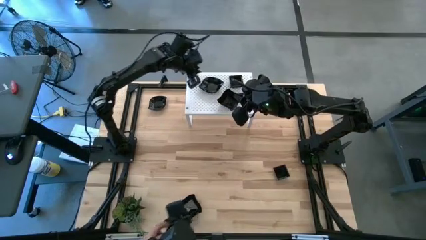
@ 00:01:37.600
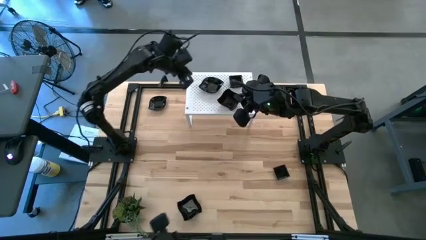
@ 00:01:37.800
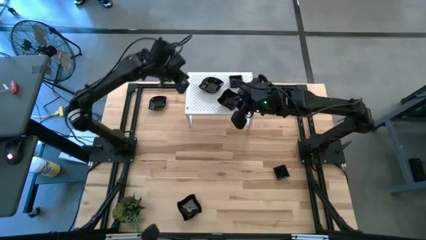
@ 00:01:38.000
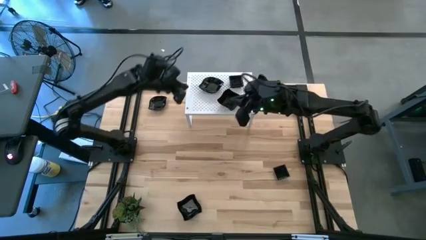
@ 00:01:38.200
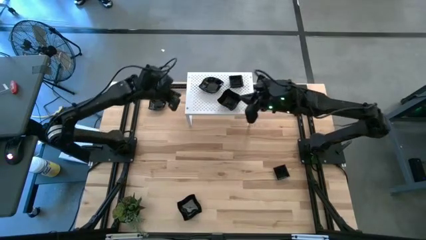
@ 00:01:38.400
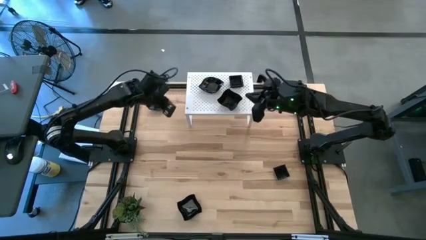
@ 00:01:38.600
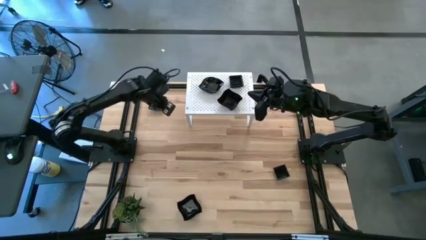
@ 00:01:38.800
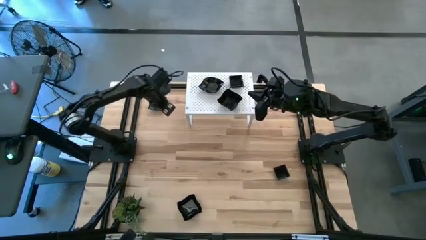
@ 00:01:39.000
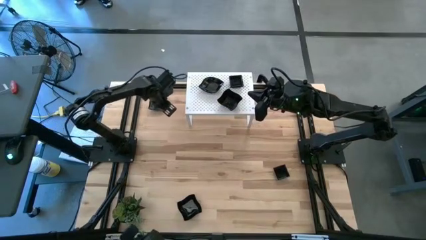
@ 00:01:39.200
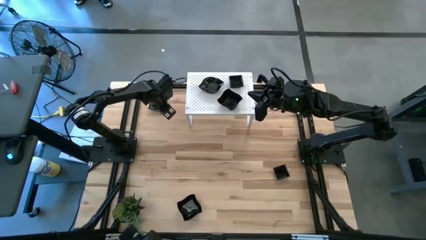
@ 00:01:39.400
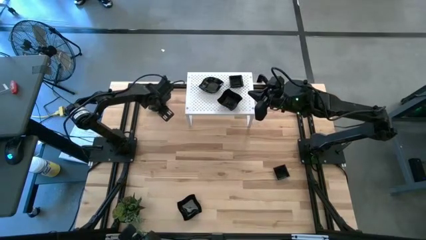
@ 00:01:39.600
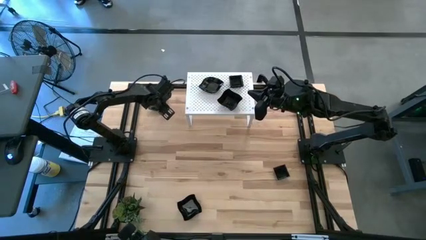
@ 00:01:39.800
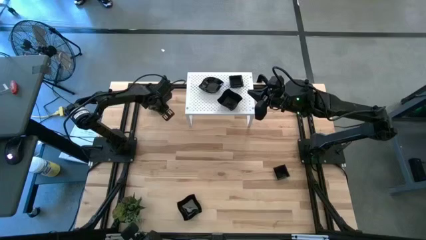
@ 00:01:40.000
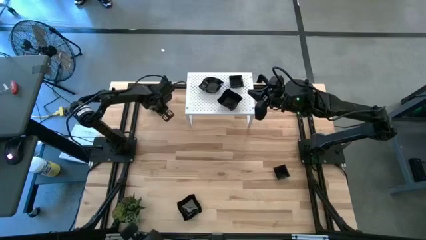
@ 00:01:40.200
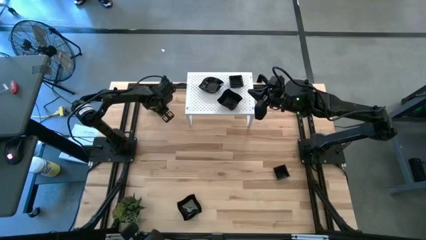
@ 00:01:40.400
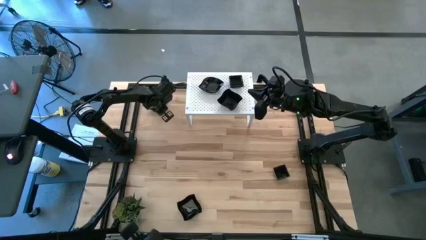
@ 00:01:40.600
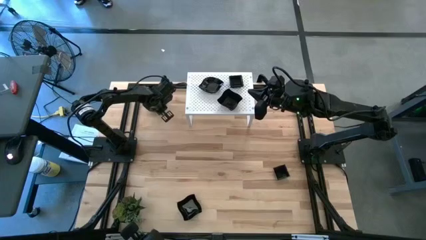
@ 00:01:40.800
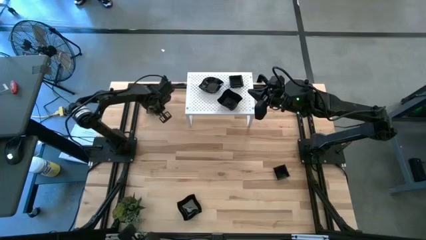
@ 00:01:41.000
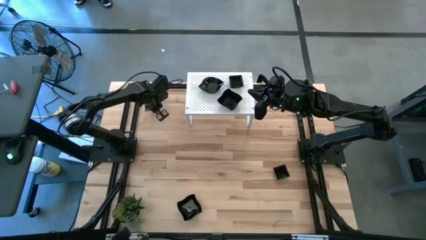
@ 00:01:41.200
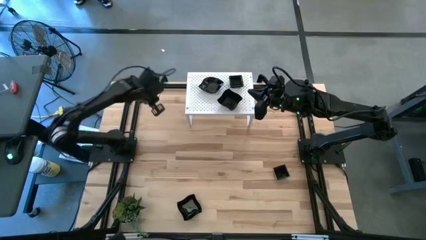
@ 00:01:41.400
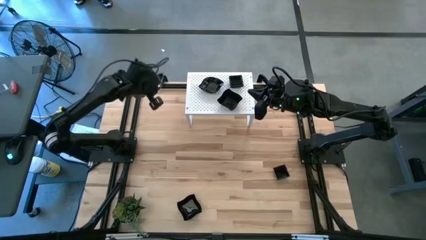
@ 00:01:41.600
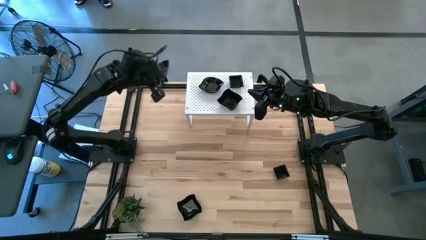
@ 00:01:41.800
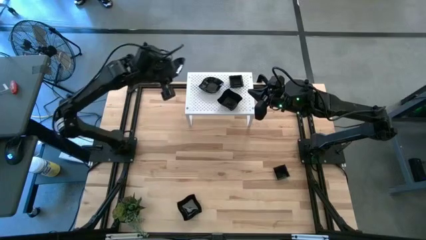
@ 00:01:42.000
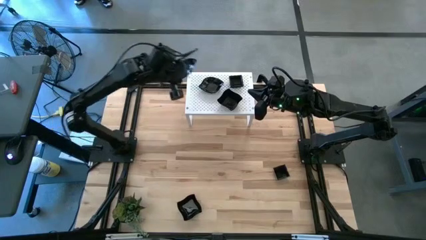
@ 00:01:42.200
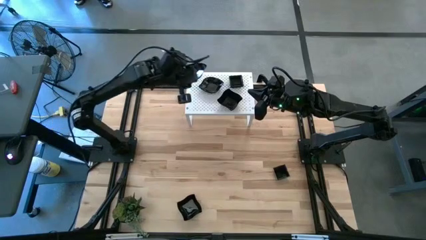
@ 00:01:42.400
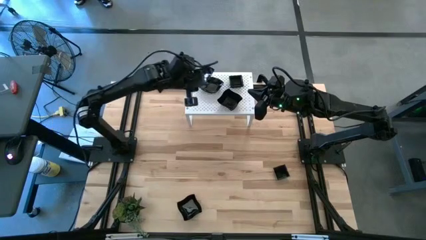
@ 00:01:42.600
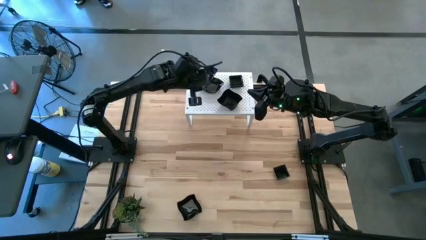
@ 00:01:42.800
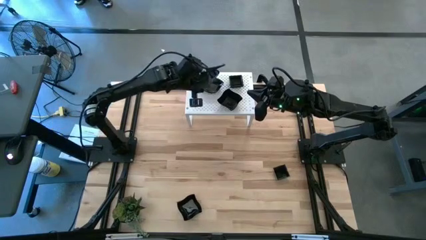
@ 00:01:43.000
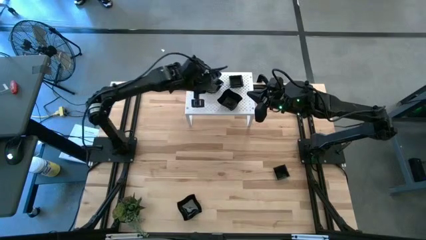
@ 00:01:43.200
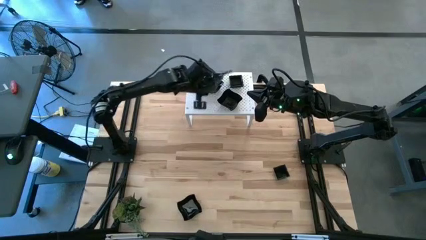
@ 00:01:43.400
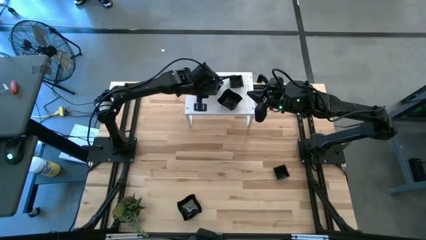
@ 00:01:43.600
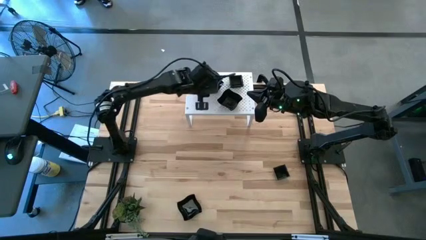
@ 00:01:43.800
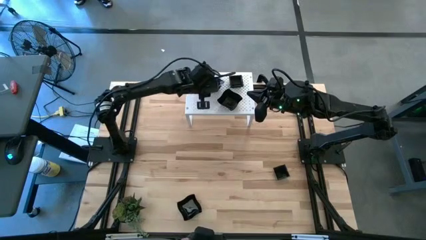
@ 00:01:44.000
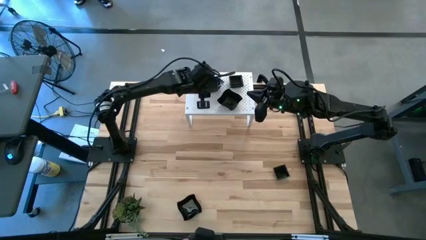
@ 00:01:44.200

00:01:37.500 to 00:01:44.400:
Task: Pick & Place Mini shaped plates
Stack the leaf-shaped plate on top of the stacked leaf-shaped plate on the shelf

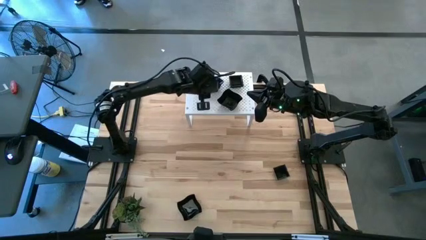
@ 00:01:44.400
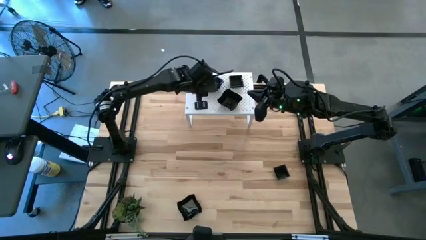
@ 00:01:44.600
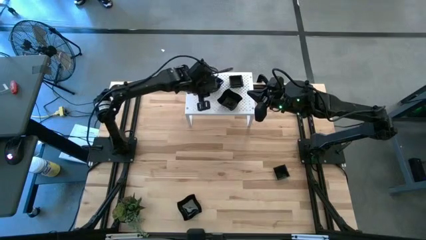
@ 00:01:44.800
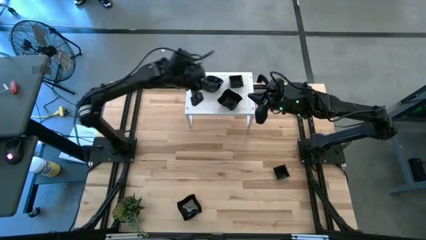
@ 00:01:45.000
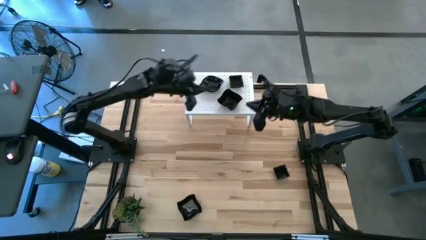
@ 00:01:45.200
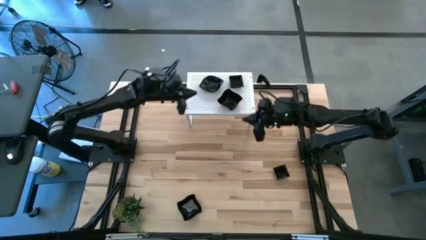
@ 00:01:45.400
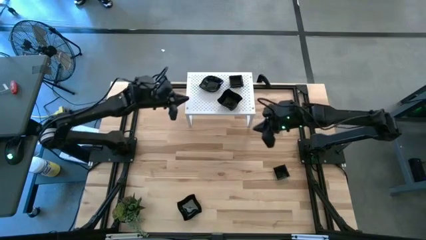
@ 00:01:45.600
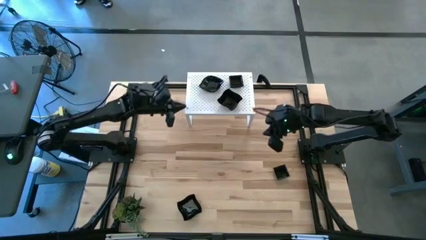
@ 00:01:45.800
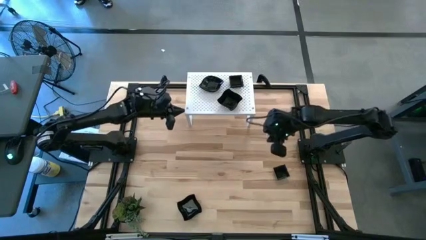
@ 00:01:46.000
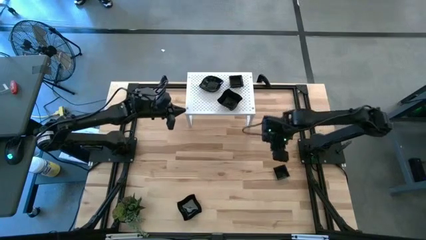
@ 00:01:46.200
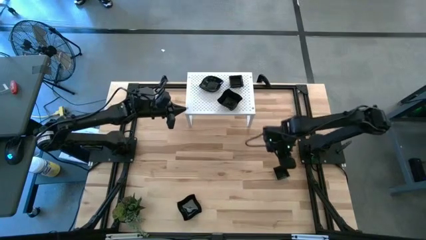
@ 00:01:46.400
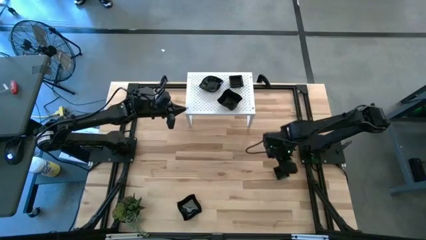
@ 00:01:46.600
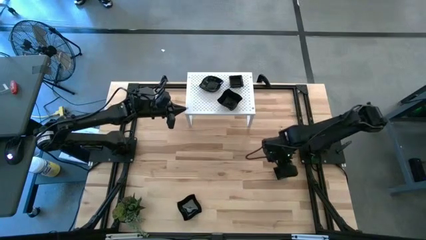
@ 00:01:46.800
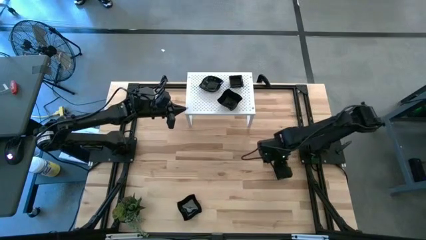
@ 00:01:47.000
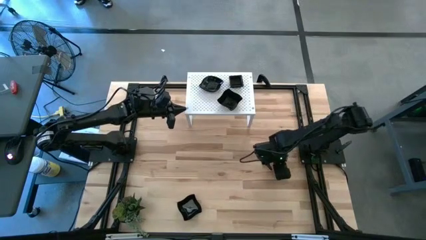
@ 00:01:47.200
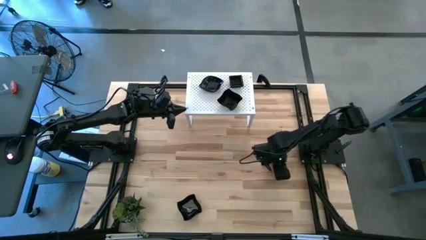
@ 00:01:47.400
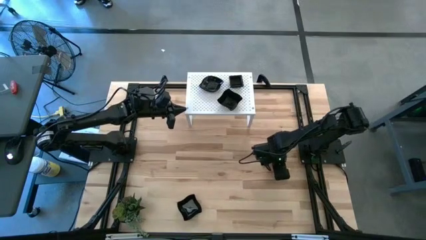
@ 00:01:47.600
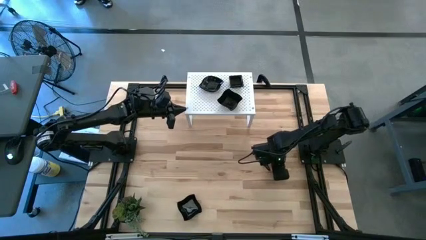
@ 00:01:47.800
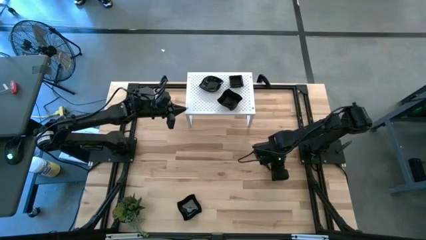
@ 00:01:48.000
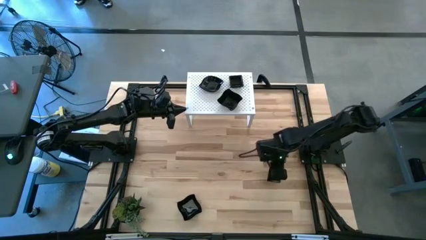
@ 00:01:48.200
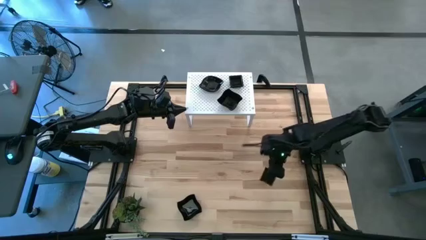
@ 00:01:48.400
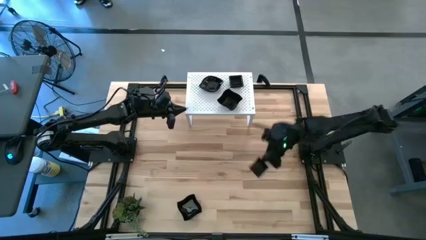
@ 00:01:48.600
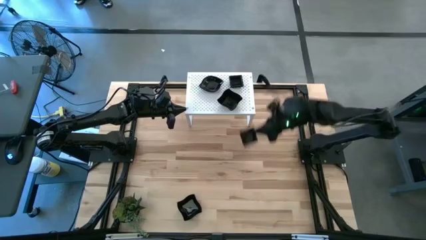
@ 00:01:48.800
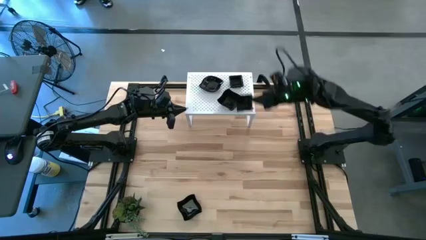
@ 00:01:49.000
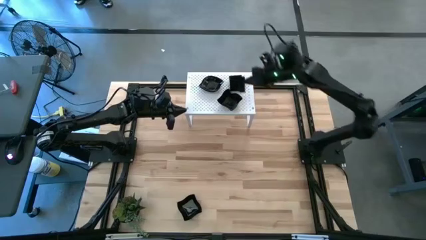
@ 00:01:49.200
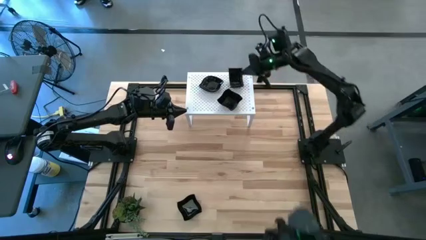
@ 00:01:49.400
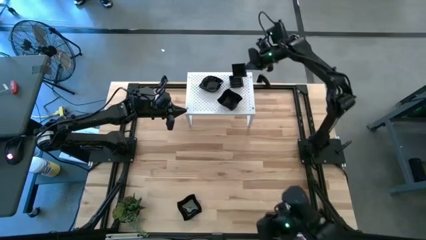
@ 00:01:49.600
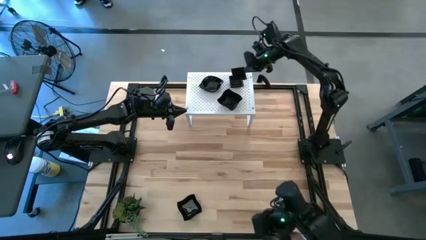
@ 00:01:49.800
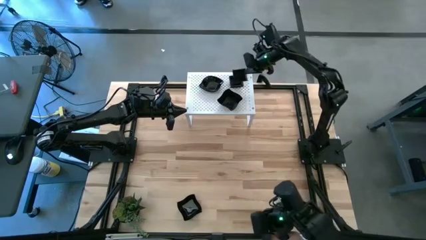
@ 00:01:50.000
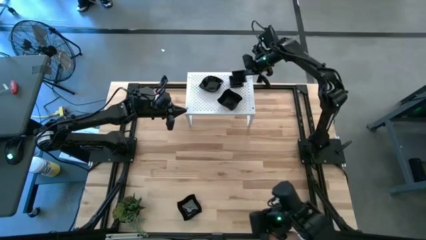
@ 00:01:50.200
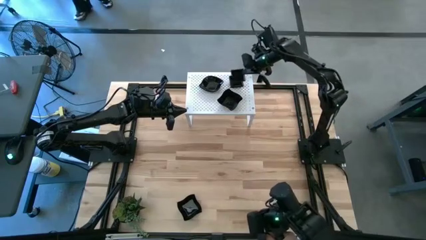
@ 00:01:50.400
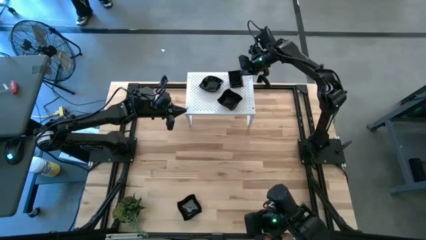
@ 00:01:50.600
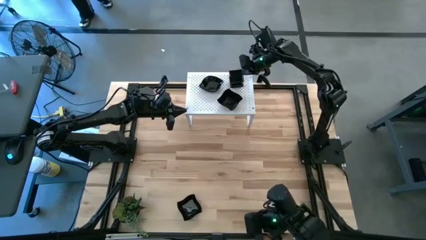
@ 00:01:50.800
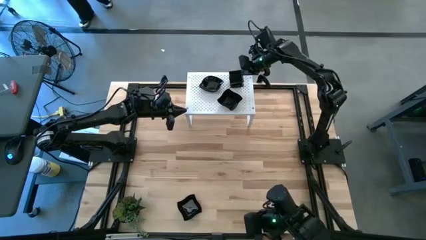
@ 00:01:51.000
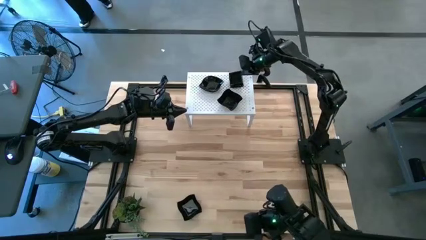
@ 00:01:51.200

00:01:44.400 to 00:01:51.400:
Stack the square plate on top of the stacked square plate on the shelf

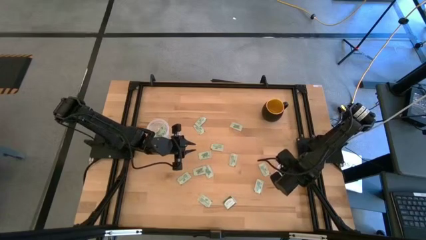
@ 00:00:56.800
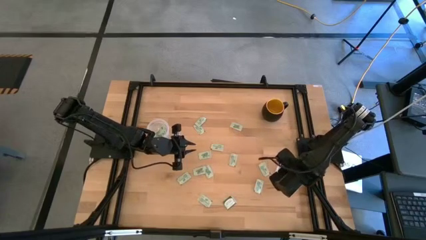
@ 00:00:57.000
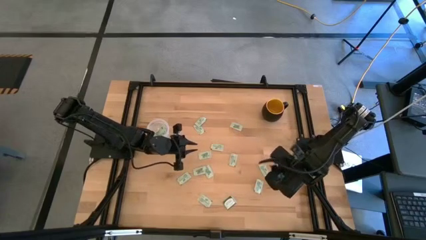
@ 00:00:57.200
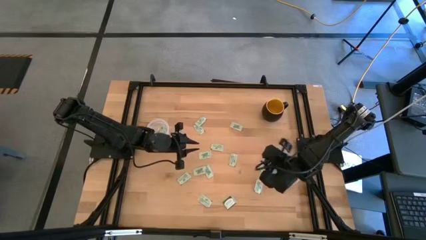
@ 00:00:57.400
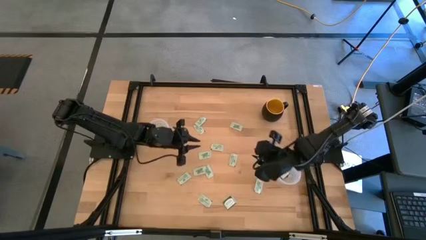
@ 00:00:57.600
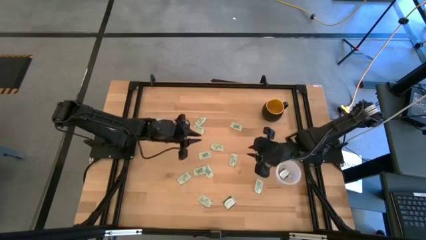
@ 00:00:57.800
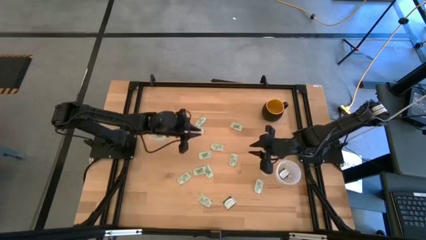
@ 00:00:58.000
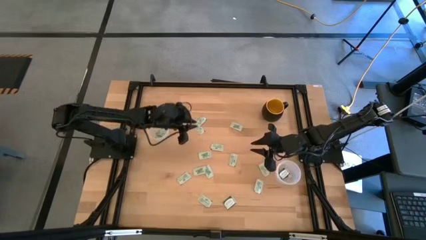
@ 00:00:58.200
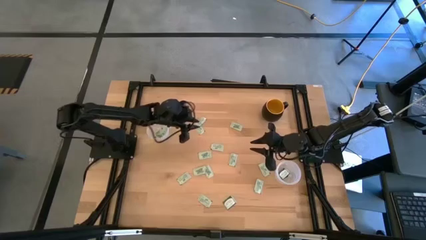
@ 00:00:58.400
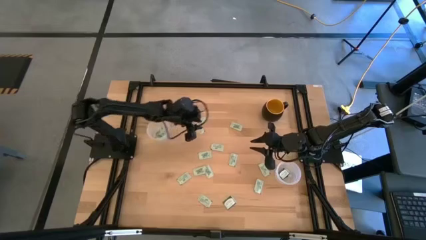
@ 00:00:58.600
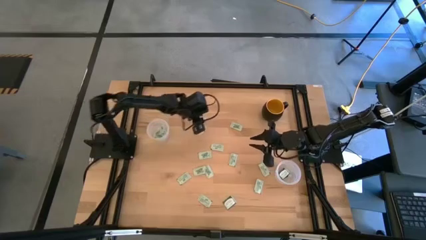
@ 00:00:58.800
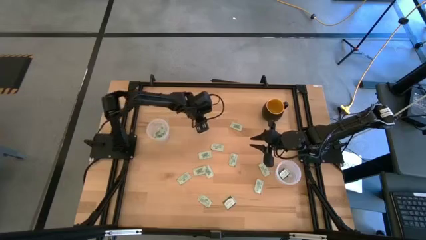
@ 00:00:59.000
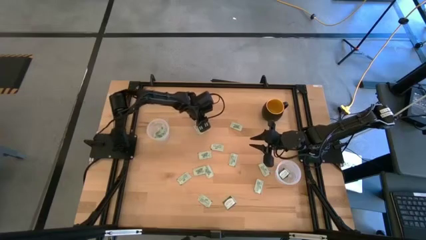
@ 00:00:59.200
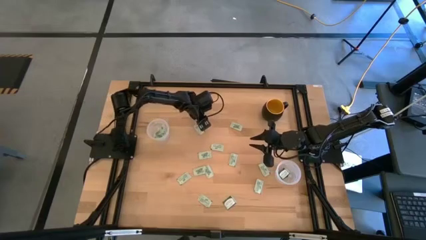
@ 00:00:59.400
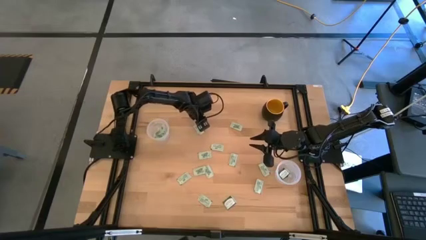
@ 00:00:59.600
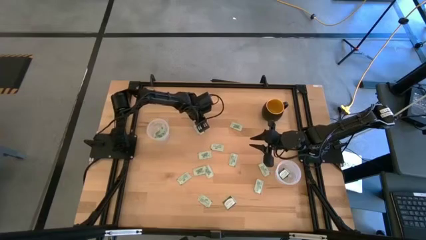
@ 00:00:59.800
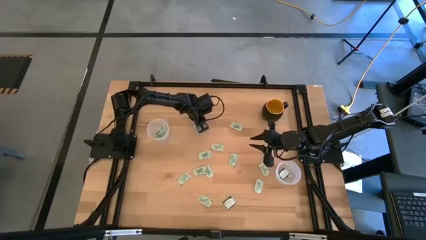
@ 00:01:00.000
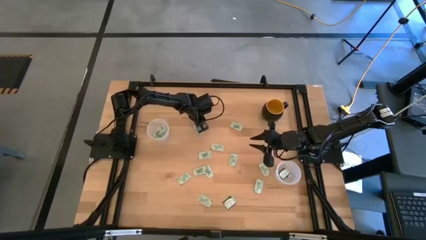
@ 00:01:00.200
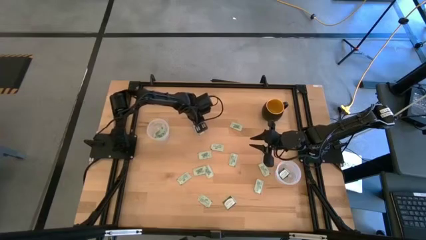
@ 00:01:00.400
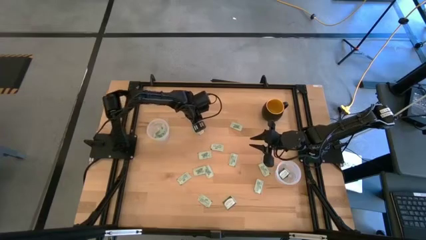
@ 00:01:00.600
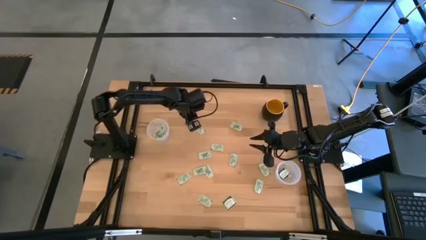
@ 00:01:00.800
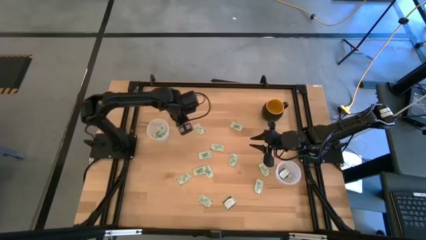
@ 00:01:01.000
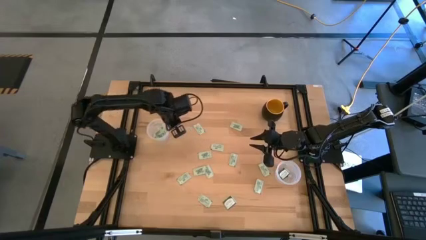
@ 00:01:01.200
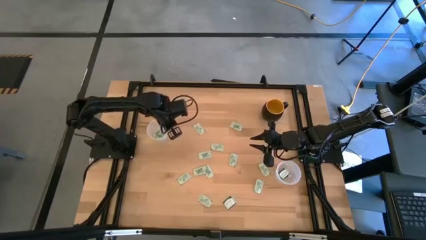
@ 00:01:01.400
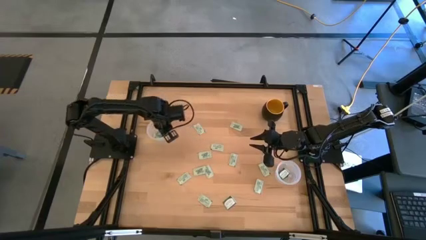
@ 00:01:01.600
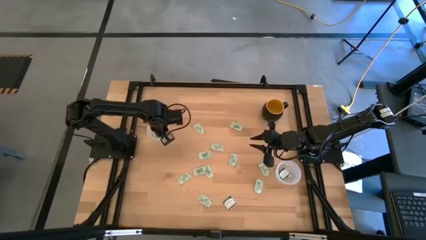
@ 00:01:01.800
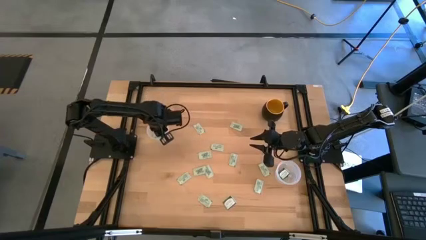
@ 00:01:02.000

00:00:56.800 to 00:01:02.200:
Task: Pick and place Stevia / Truvia into bins
Put the white stevia packet into the left transparent container
